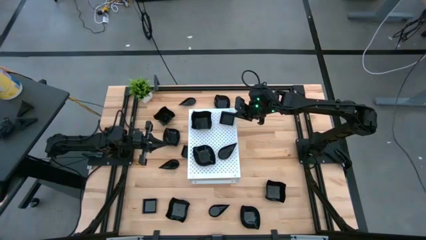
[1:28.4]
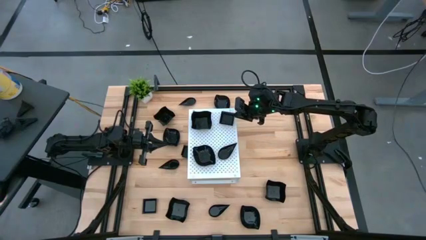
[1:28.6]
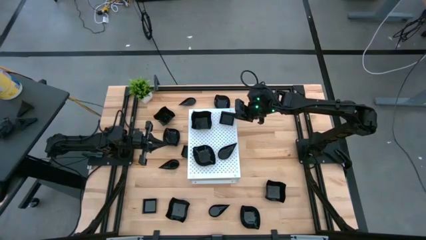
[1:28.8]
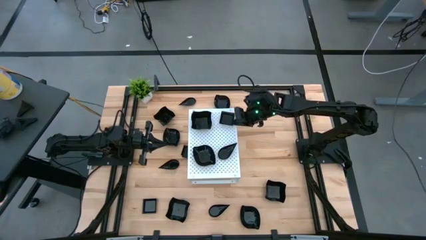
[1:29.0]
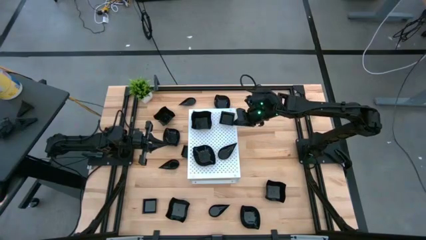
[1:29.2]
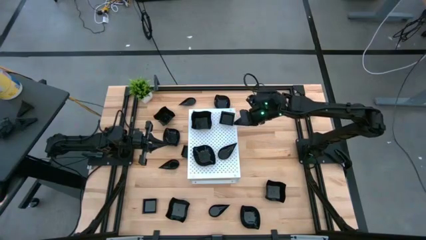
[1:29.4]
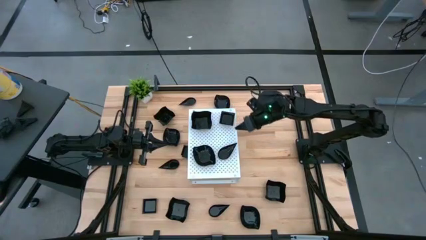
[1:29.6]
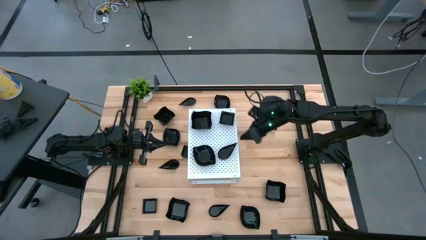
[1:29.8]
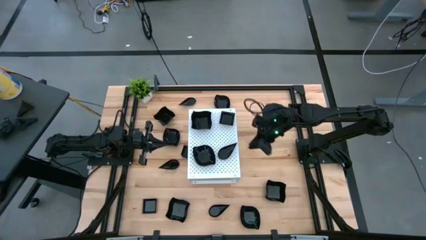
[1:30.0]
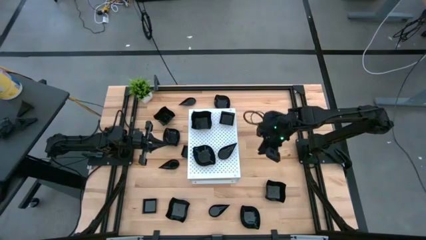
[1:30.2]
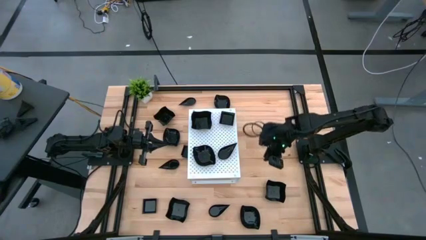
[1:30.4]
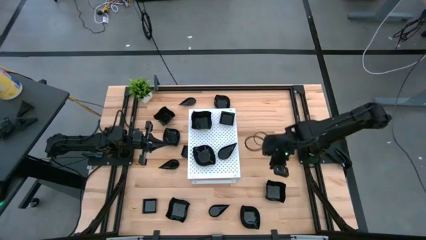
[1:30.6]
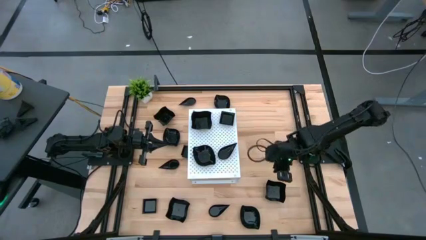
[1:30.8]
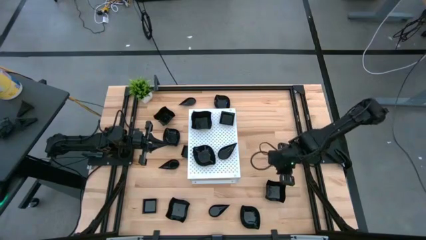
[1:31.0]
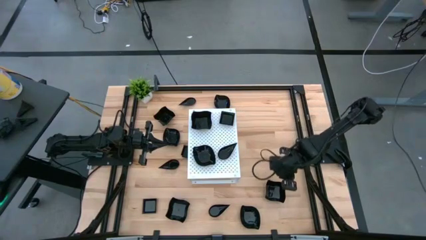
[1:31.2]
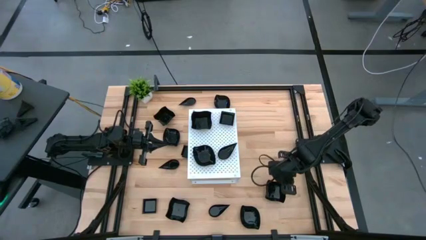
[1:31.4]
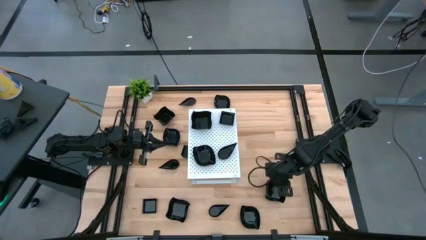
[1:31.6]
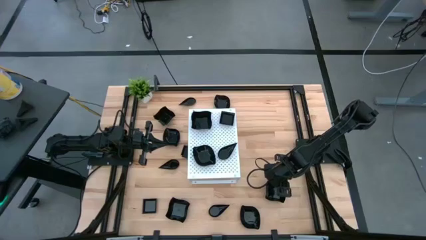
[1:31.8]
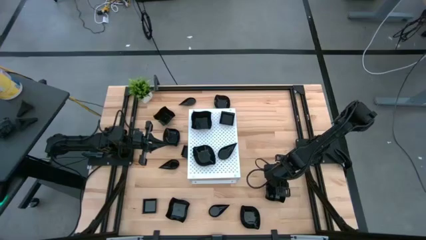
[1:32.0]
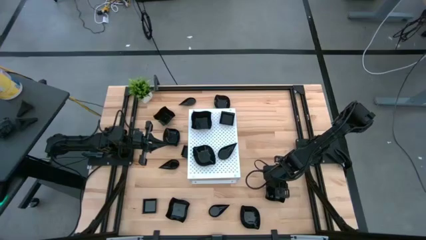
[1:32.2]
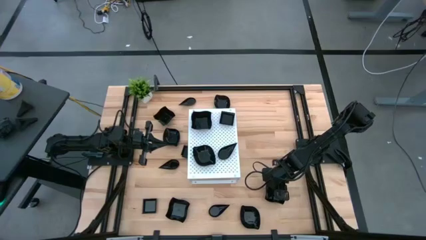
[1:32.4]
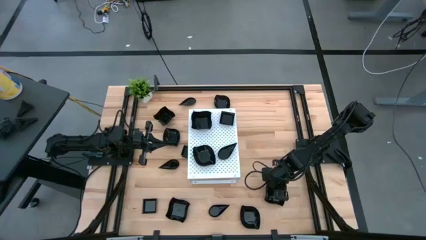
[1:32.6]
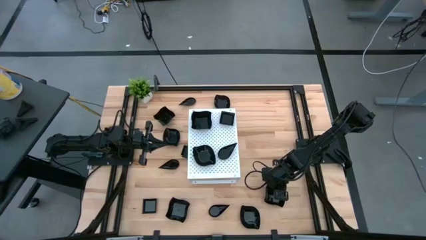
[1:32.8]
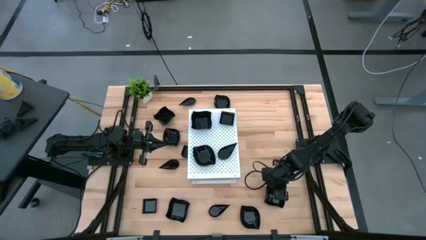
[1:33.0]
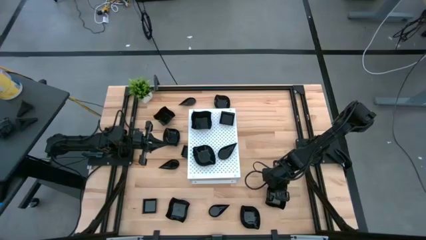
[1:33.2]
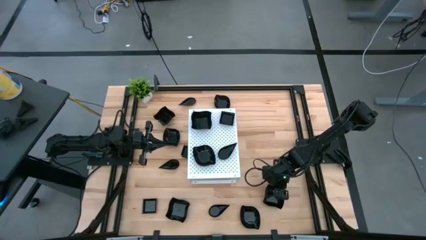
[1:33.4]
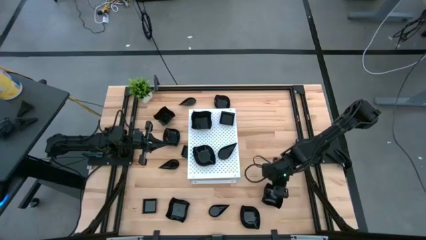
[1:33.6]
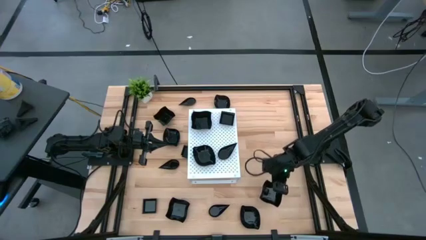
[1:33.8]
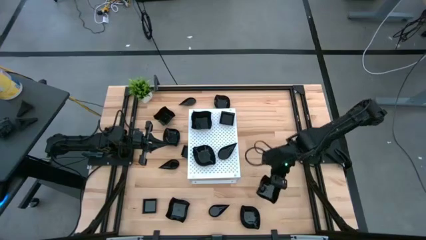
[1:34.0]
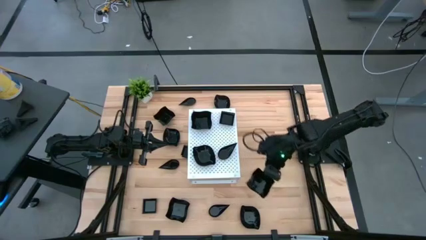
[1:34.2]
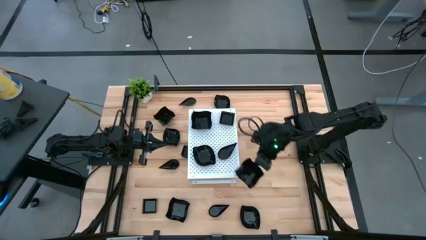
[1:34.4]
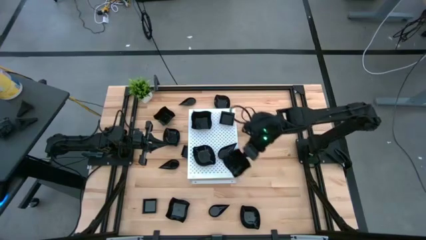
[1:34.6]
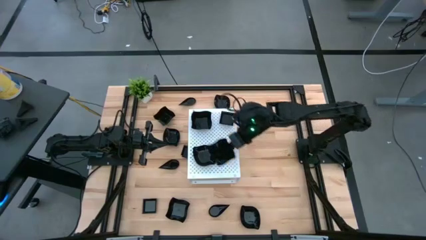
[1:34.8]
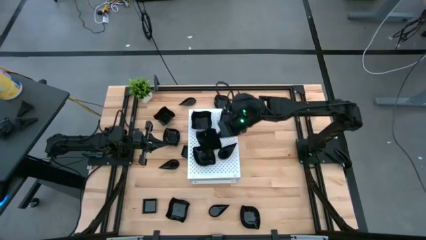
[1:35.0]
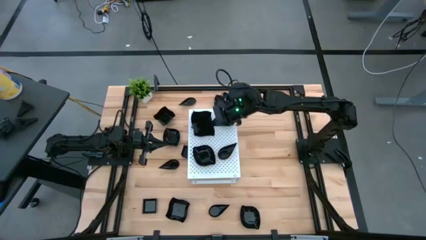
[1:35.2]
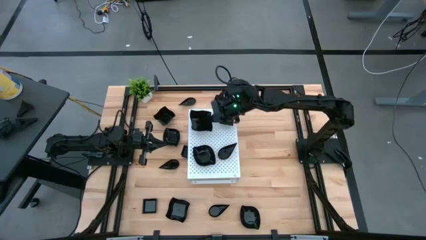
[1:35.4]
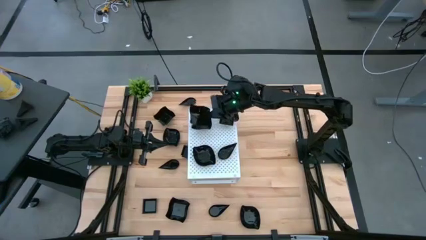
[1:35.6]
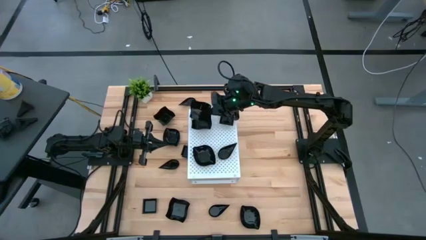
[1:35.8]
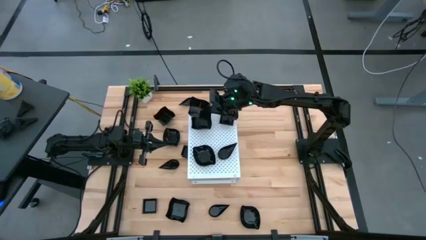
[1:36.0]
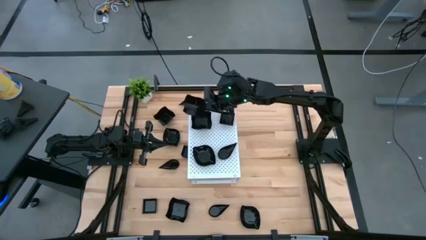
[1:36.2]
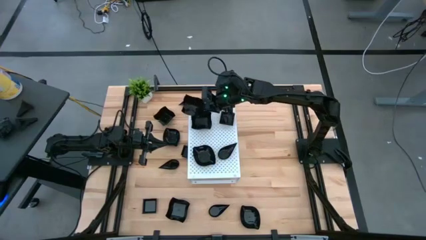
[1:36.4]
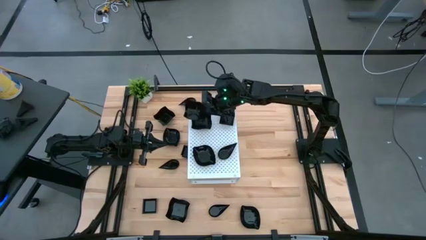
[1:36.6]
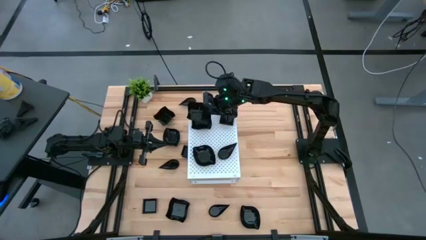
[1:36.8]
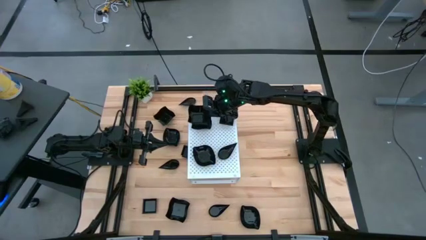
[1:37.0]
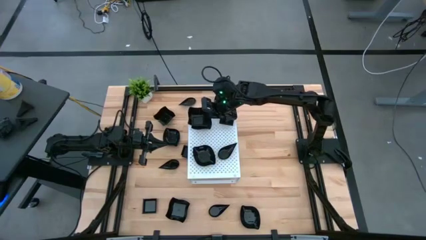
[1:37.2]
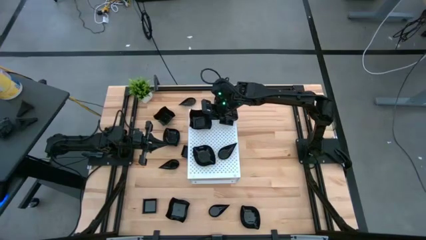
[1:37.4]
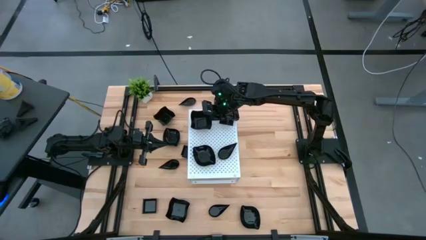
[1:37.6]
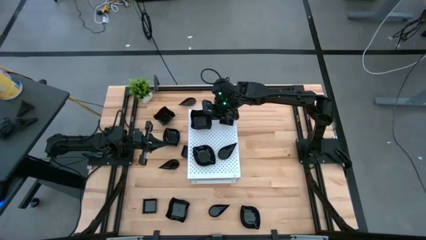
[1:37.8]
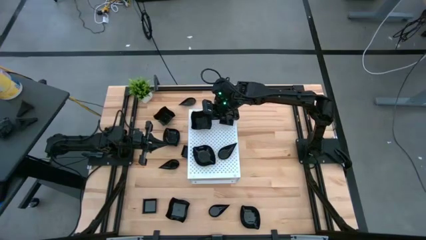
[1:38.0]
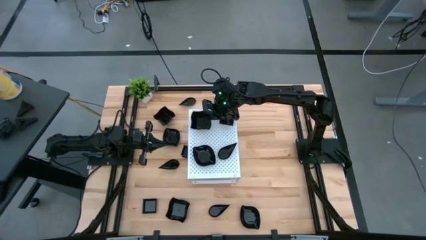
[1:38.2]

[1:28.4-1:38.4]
Task: Pick & Place Mini shaped plates
Stack the black distorted square plate on top of the other black distorted square plate on the shelf
